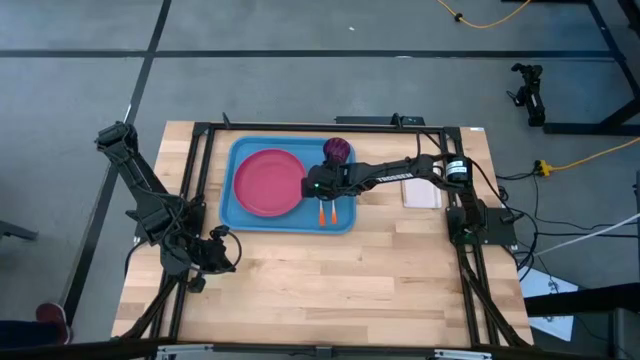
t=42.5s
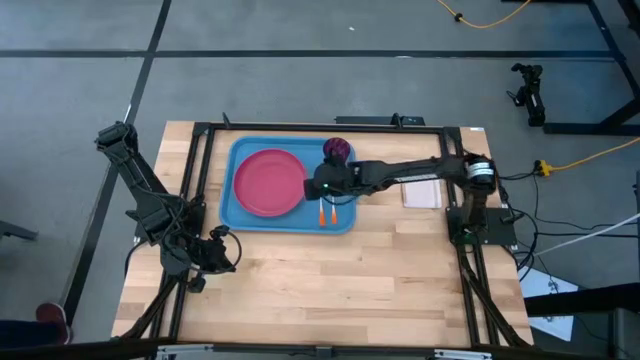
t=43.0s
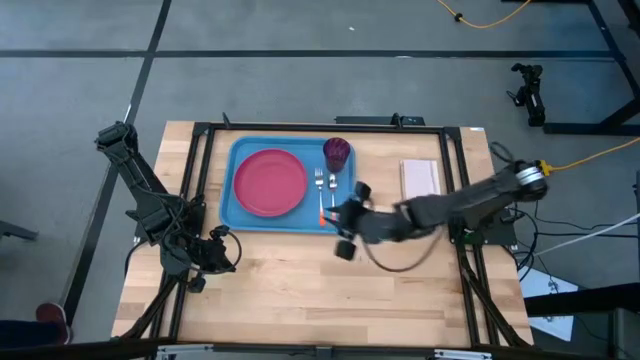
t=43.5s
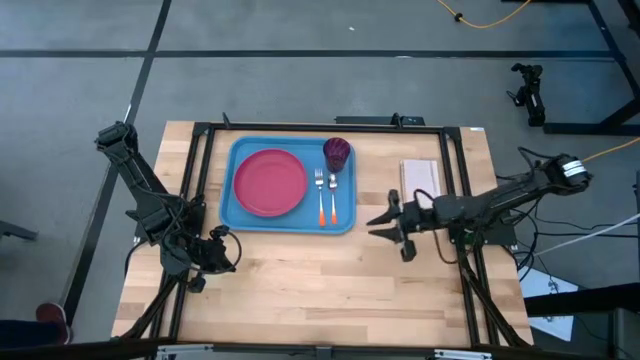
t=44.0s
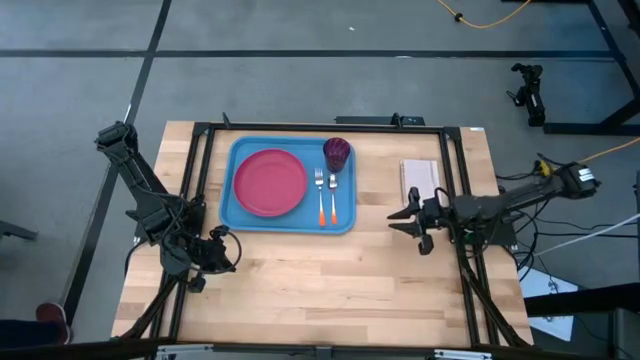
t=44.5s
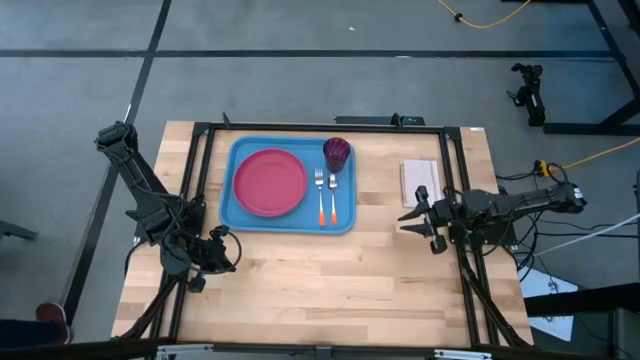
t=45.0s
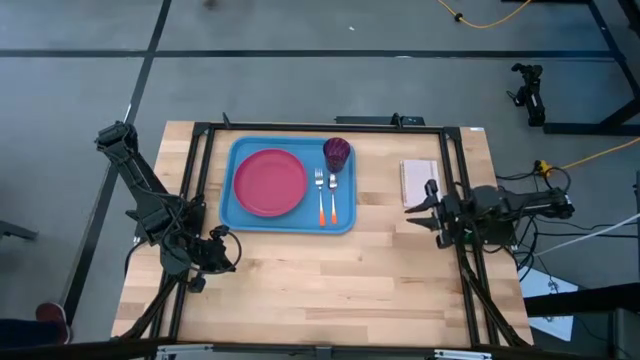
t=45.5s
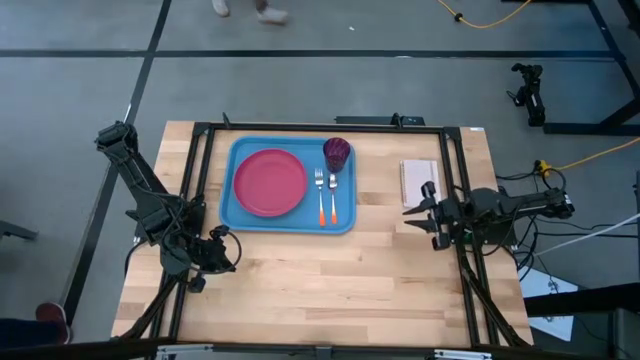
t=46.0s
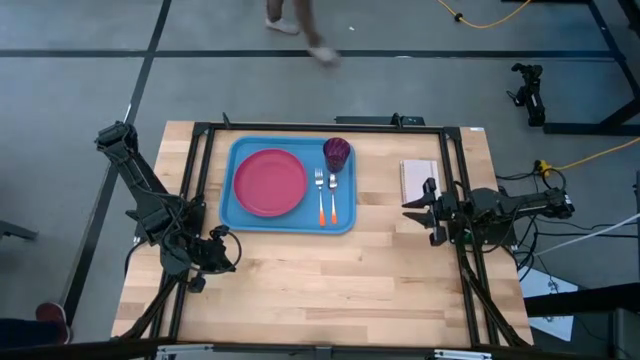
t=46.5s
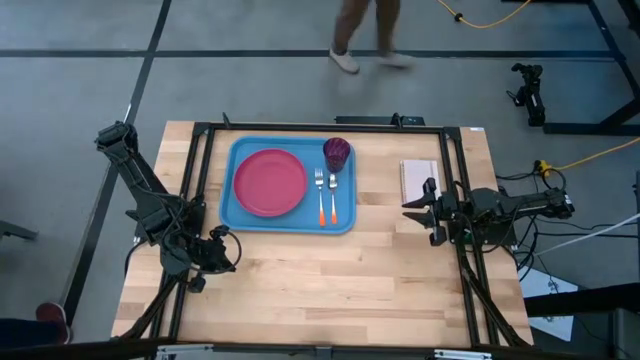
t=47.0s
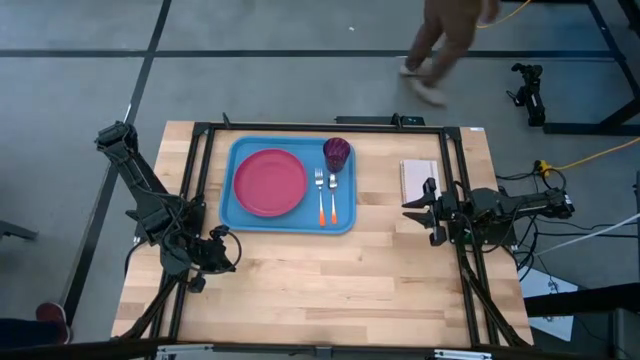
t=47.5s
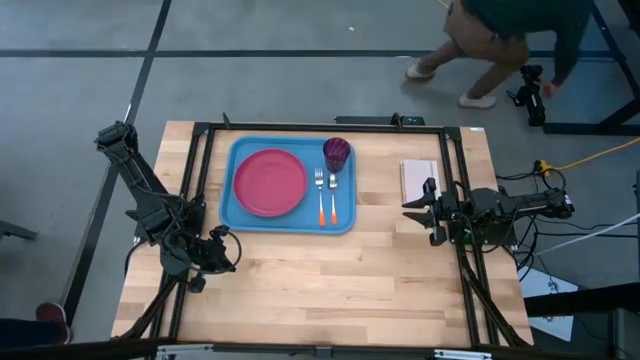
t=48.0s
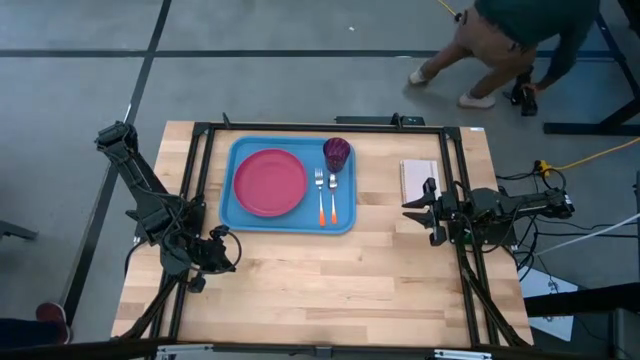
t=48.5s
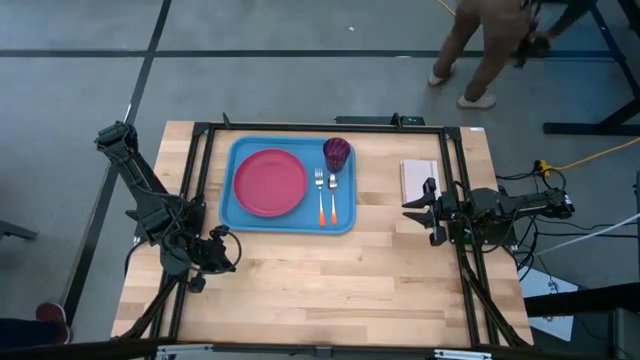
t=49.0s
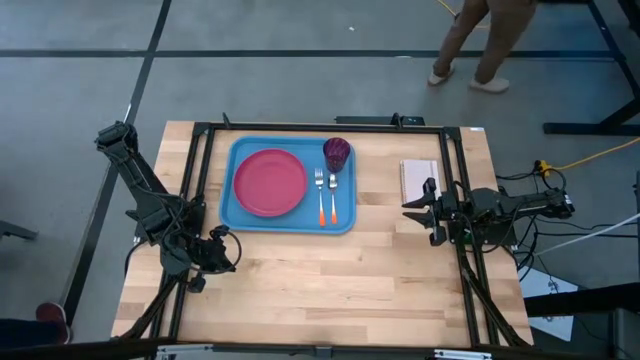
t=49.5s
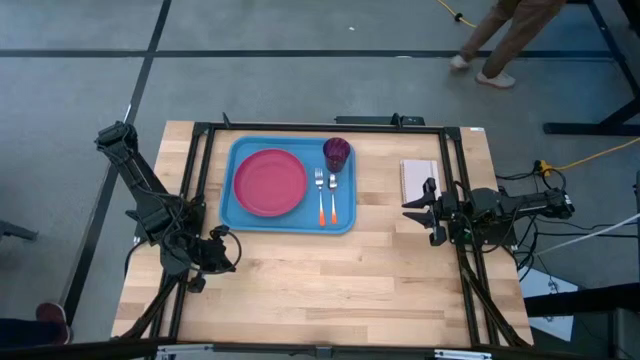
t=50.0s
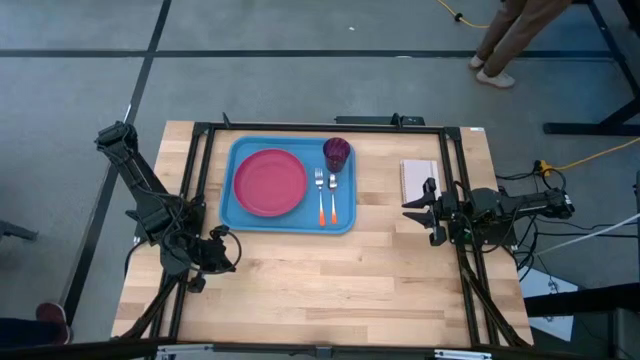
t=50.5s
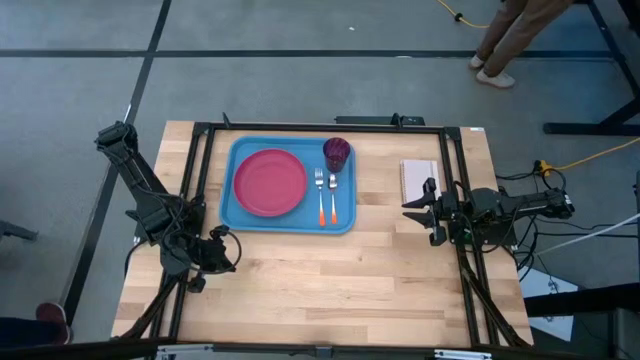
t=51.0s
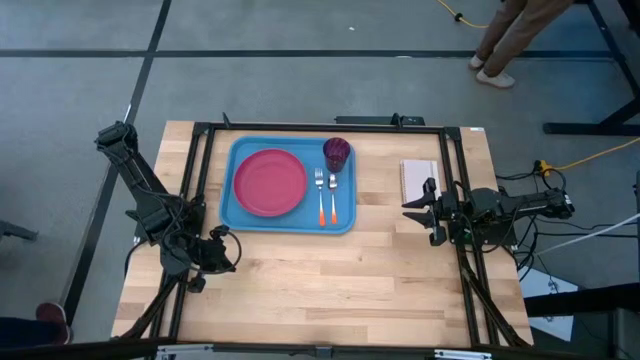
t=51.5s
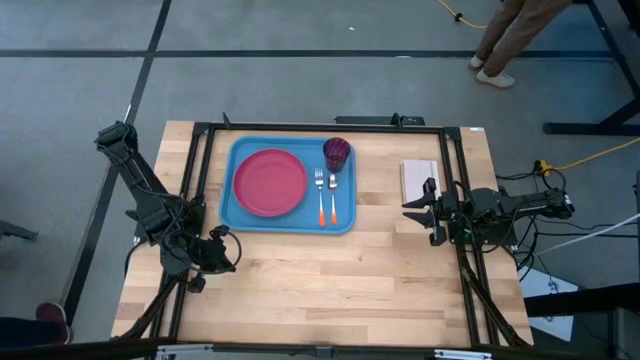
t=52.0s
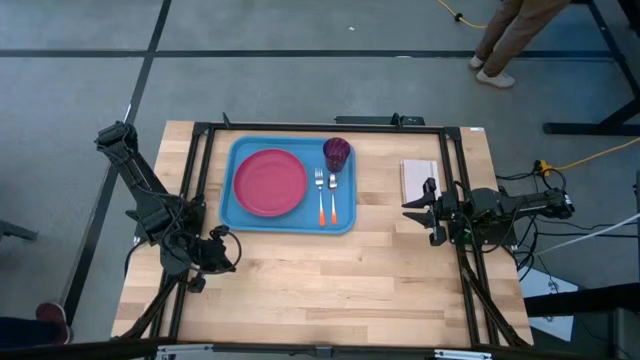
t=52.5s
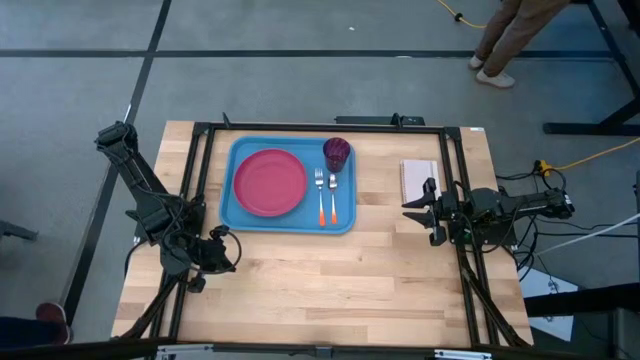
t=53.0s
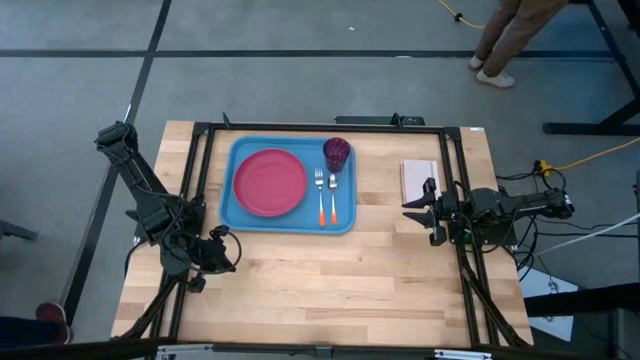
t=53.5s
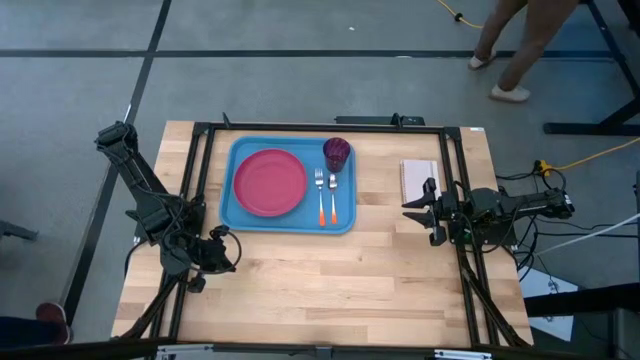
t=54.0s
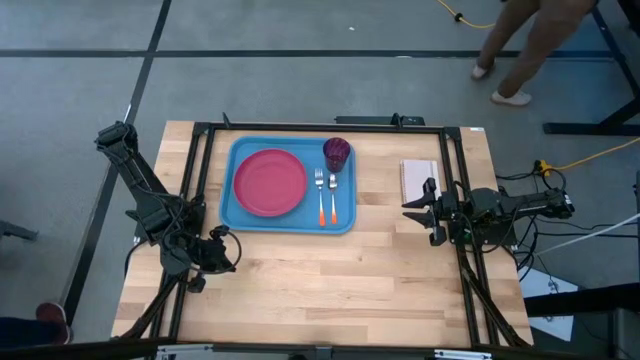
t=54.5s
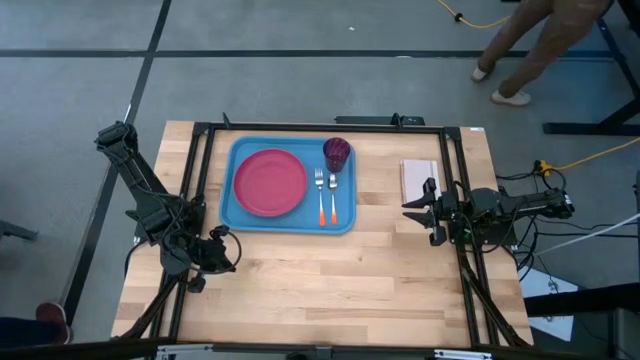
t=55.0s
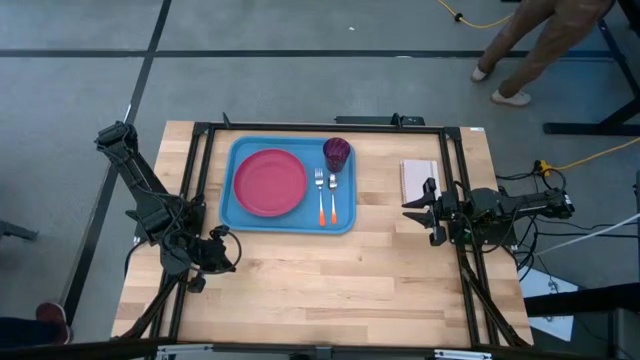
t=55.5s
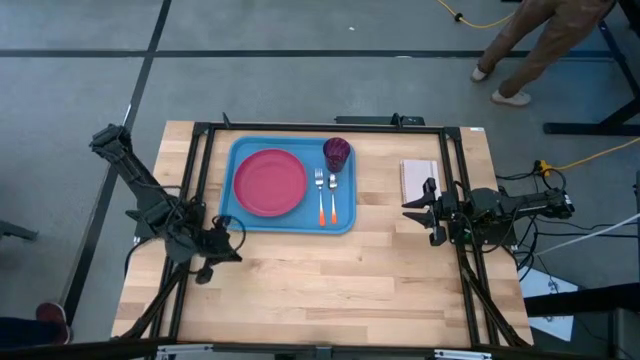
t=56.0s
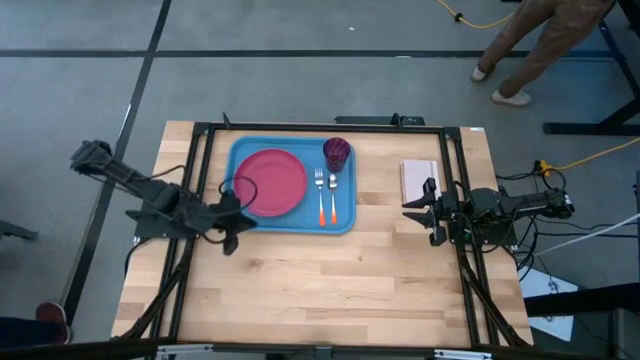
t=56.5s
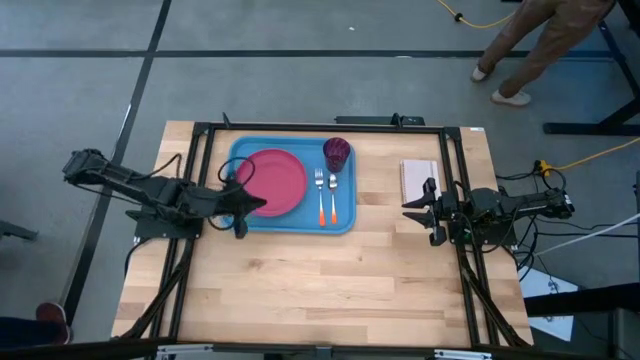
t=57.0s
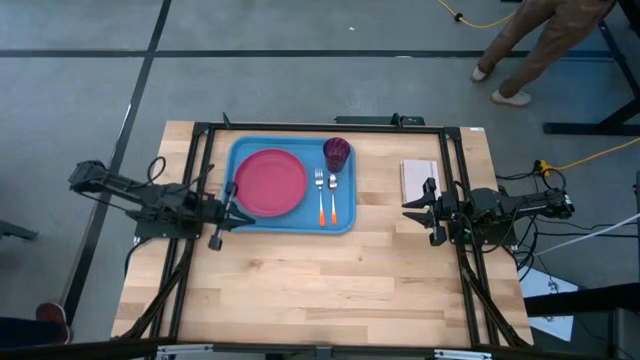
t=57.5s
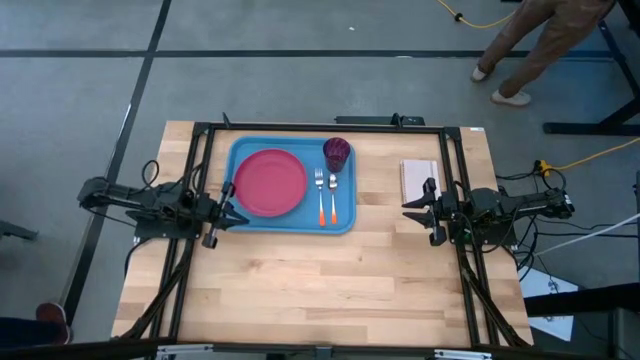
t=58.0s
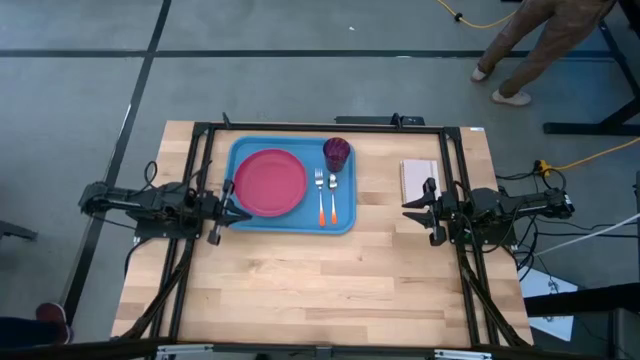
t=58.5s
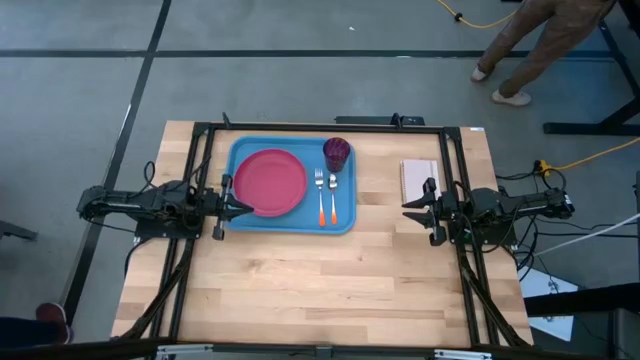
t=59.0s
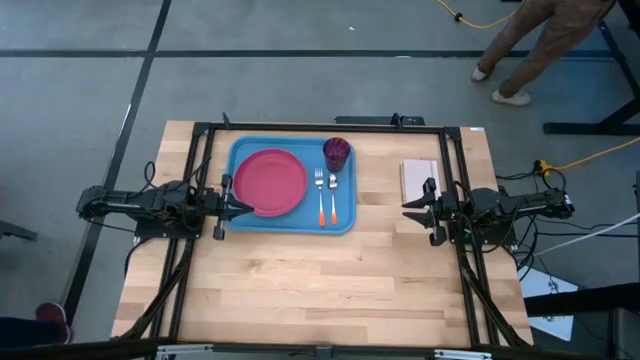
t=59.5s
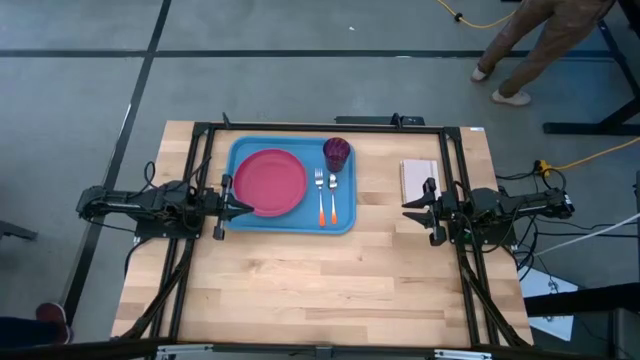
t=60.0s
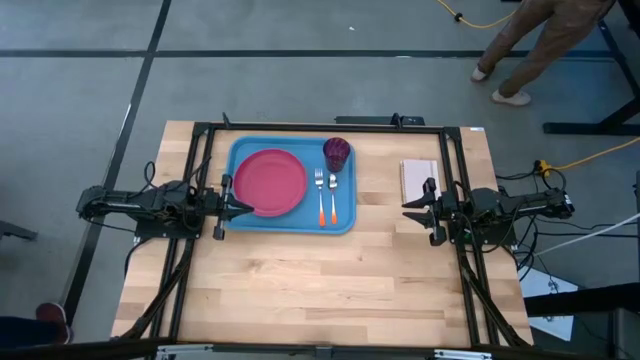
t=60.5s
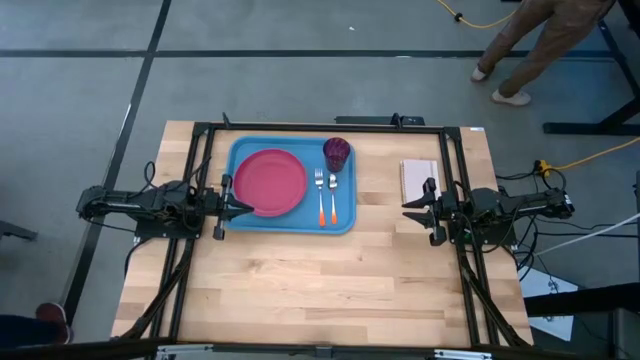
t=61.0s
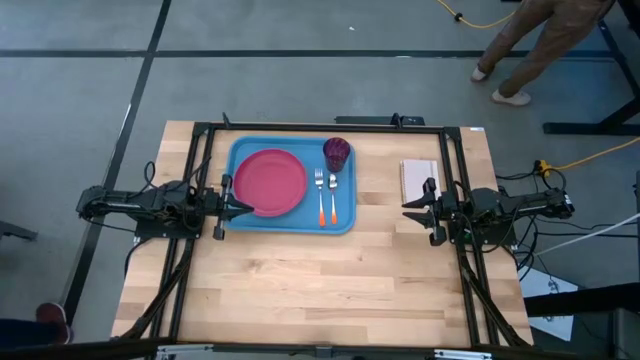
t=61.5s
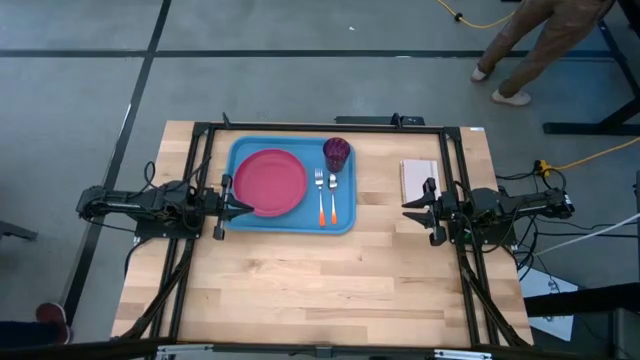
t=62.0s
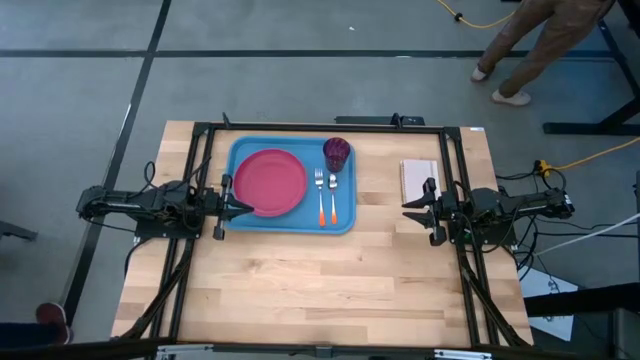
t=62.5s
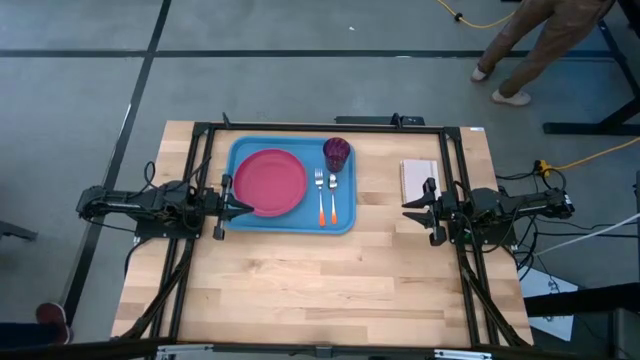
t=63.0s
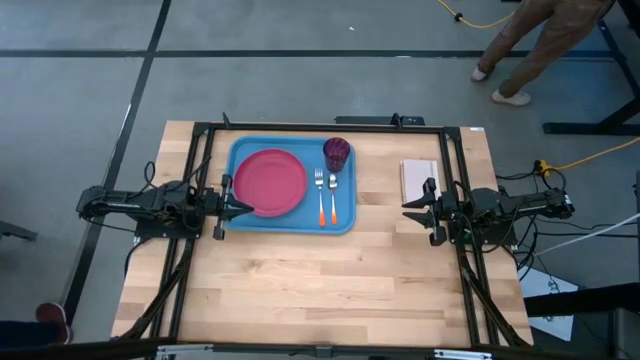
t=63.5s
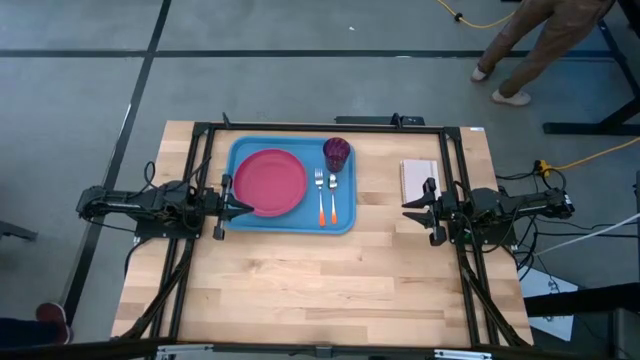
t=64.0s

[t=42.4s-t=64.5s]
Task: Pick and place plate/cup/fork/spoon on tray
Return to Home Position
